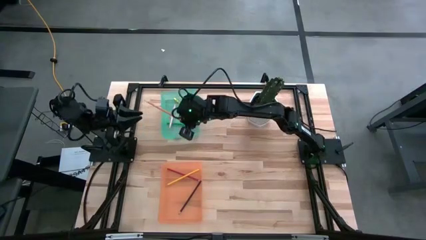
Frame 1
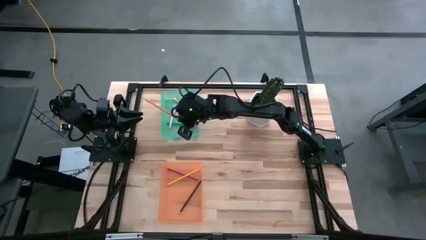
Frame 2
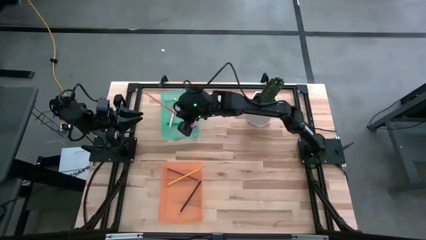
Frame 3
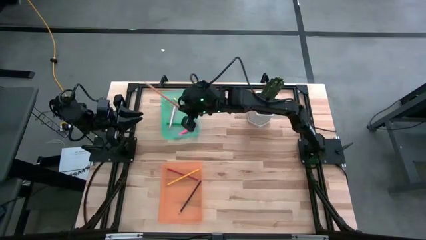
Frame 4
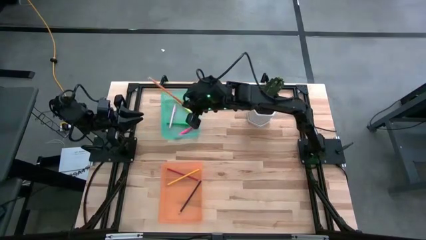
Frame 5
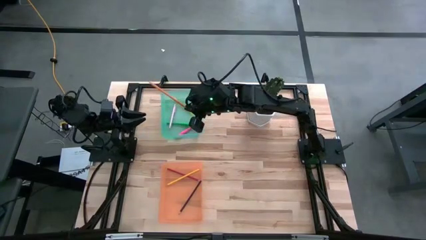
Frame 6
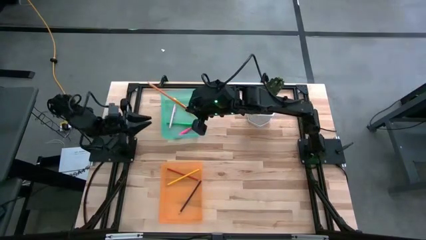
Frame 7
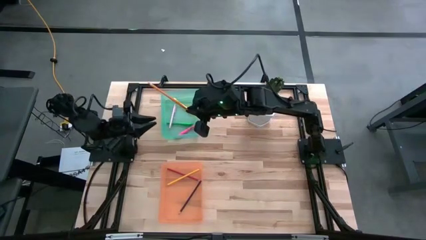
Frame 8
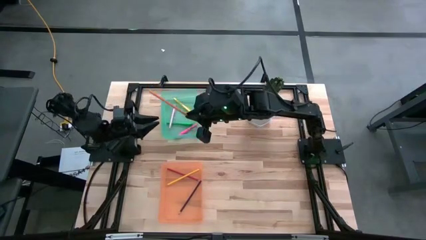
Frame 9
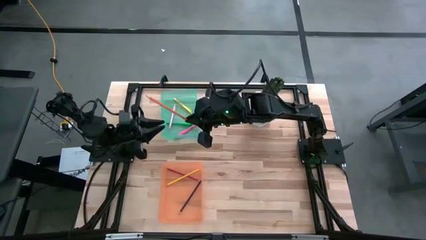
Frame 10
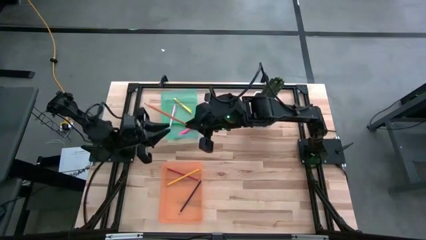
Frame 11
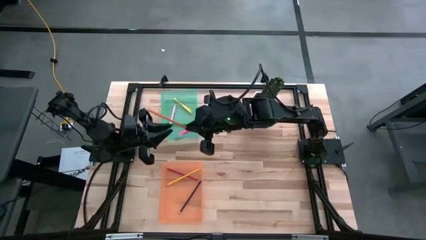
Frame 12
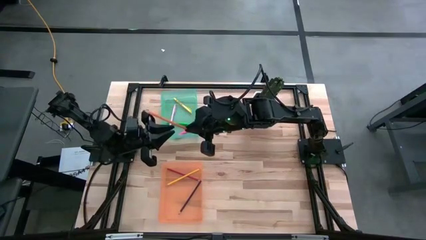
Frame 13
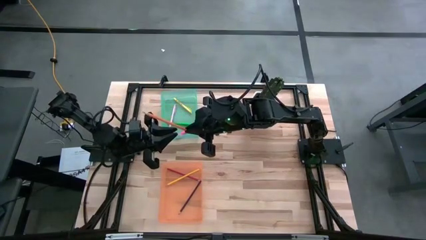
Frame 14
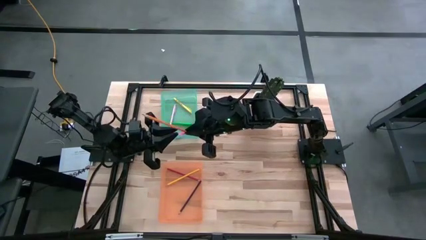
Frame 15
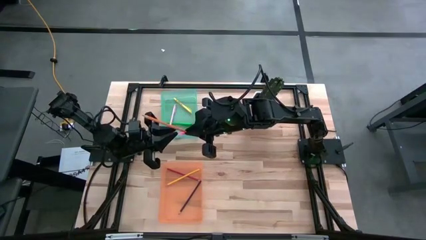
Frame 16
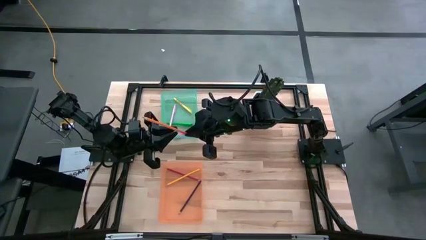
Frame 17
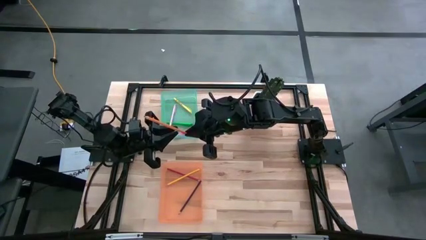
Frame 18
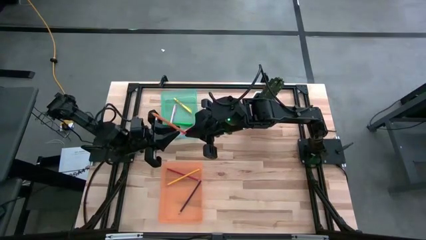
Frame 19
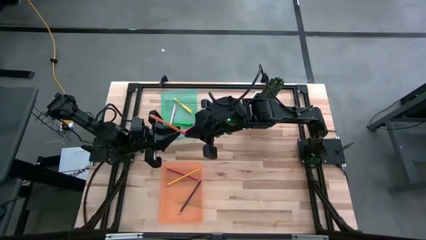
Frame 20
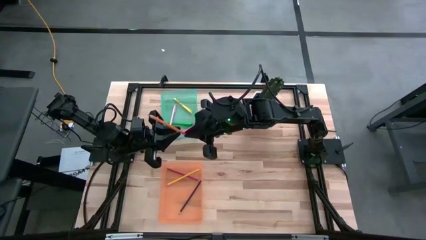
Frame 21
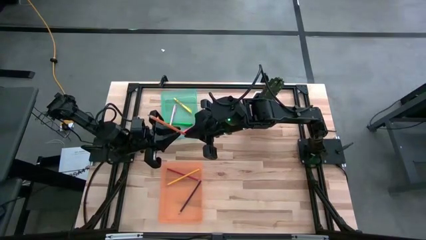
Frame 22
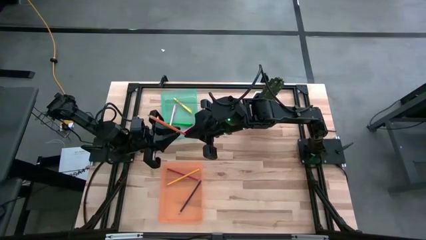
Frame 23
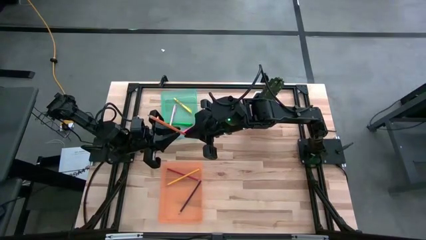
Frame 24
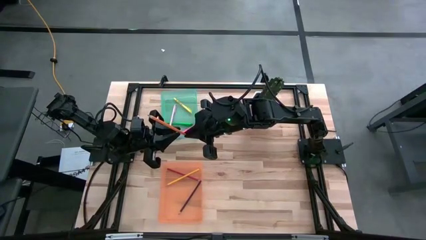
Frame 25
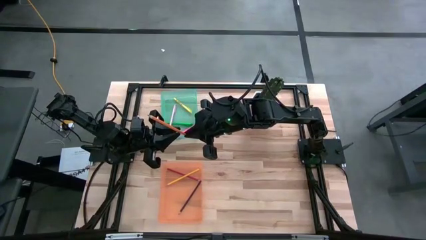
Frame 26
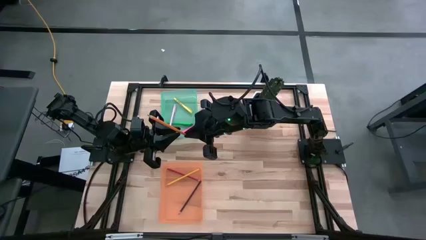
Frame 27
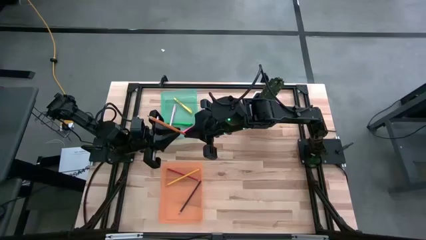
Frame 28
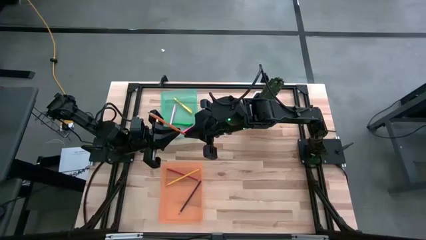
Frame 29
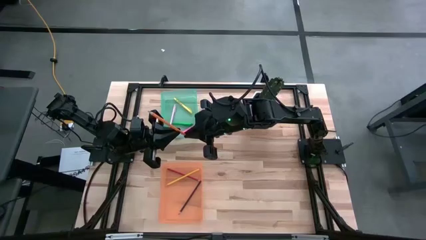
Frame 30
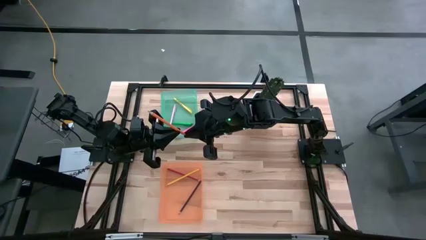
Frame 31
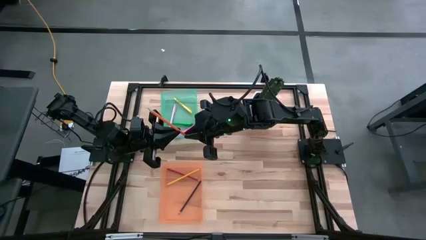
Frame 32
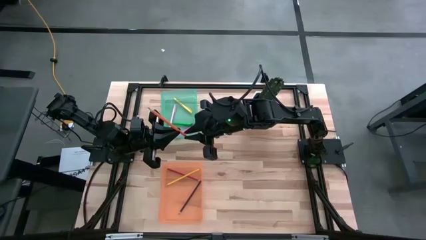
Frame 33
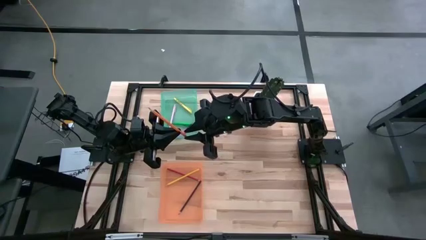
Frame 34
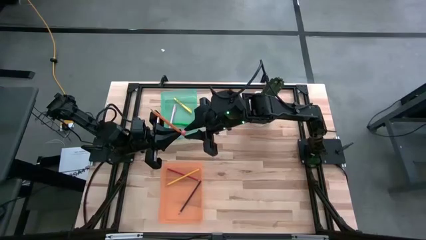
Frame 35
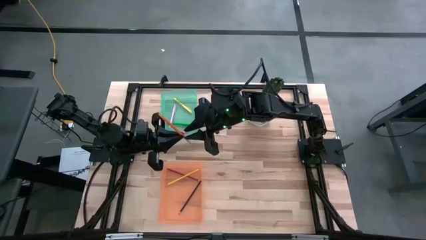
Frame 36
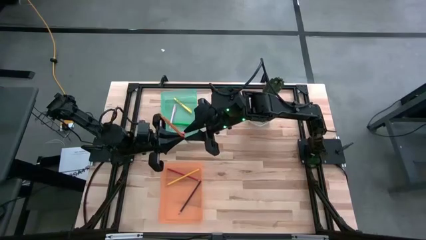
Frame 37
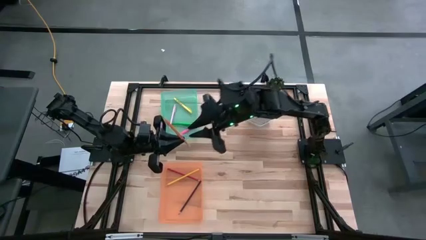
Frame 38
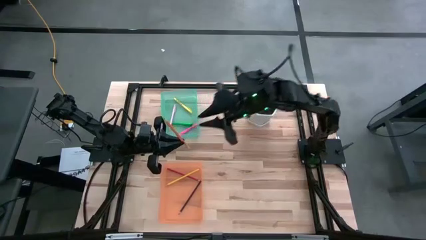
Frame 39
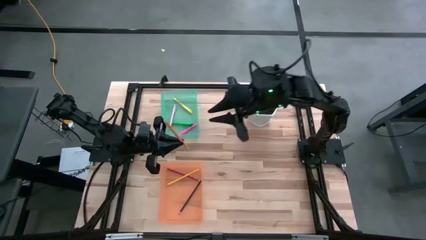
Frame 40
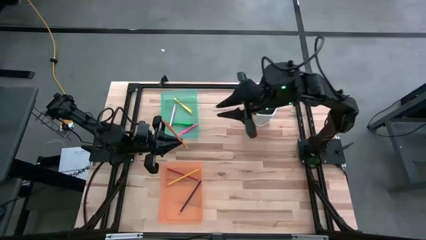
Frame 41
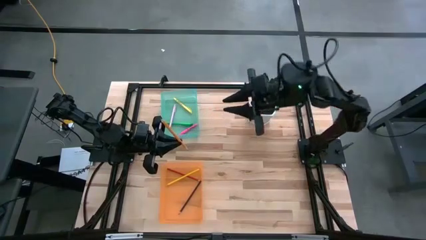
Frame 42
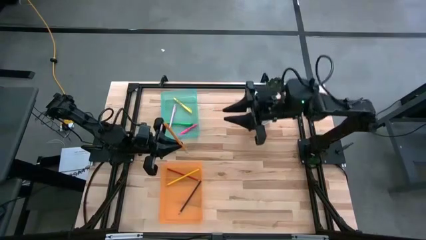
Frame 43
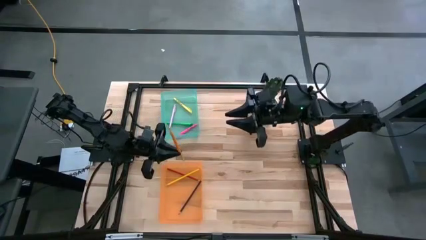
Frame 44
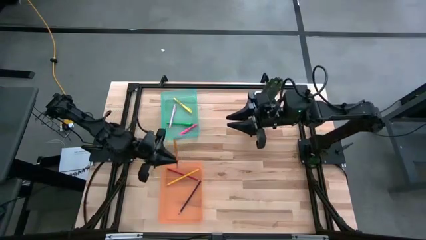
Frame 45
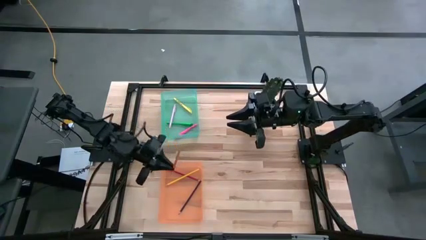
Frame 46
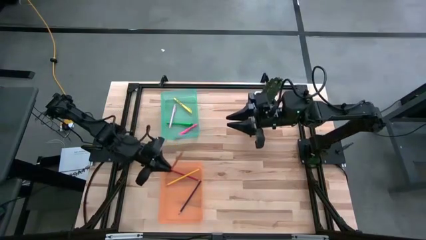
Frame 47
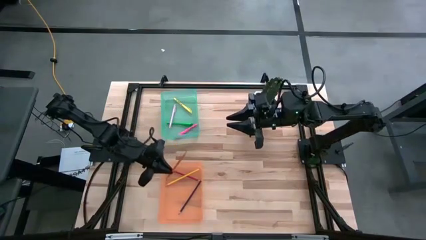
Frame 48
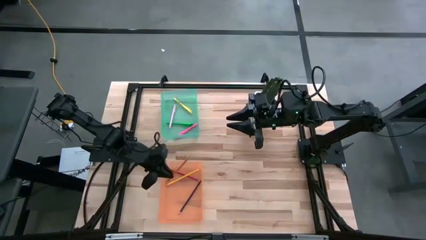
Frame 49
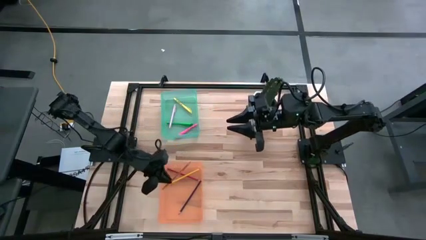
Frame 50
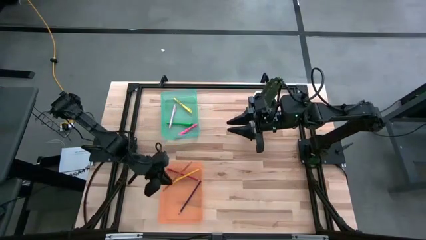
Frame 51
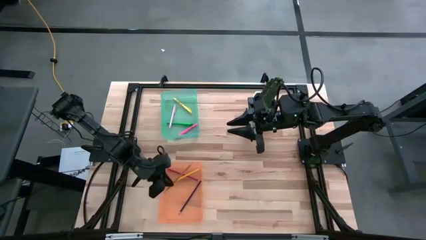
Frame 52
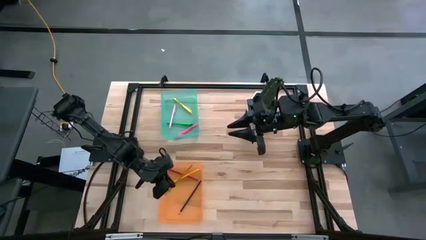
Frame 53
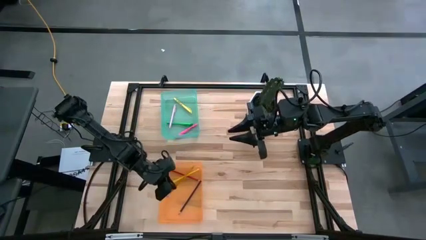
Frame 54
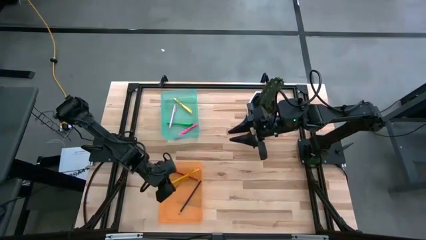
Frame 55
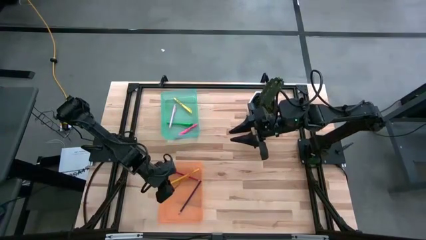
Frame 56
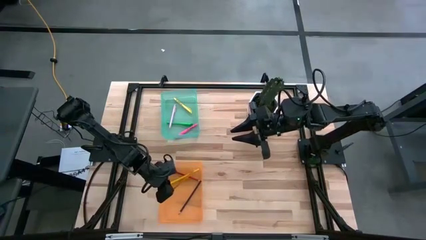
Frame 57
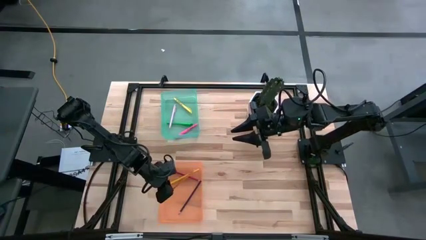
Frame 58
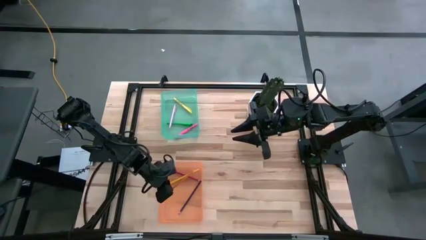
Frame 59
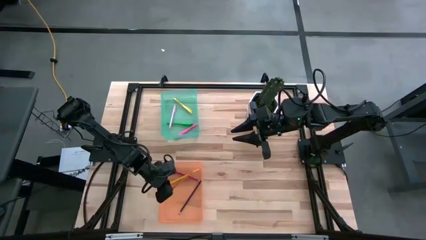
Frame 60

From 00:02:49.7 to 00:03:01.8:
Task: Sort pens & pencils
Put the orange pencil into the orange bin

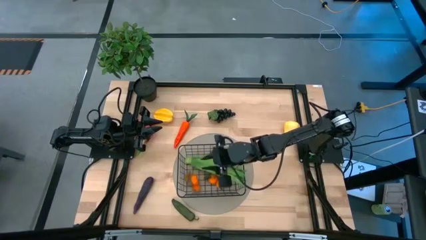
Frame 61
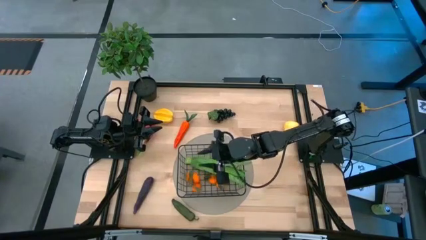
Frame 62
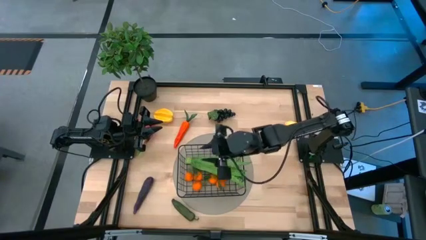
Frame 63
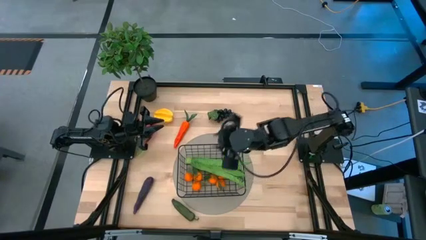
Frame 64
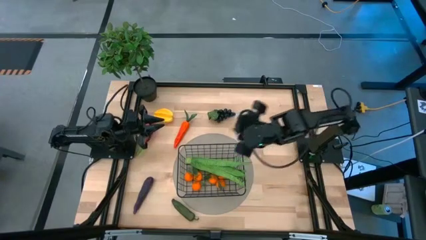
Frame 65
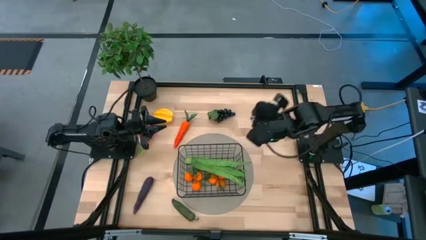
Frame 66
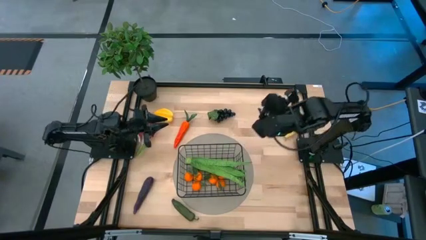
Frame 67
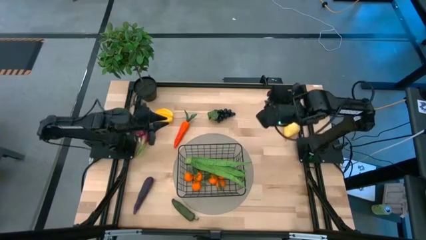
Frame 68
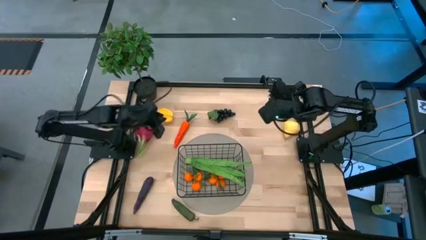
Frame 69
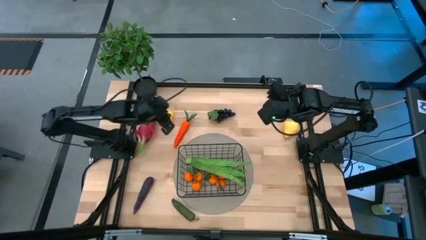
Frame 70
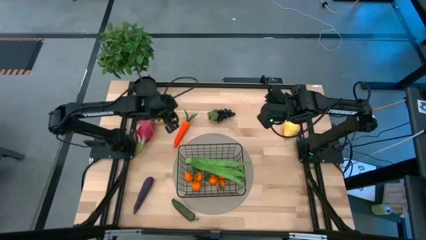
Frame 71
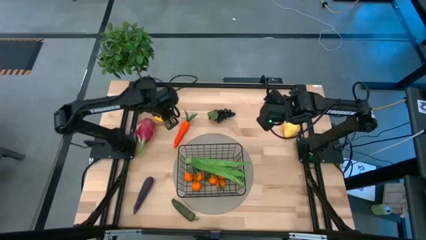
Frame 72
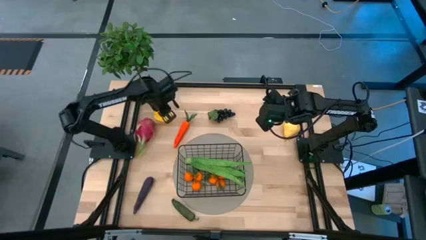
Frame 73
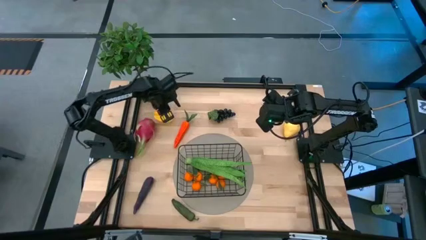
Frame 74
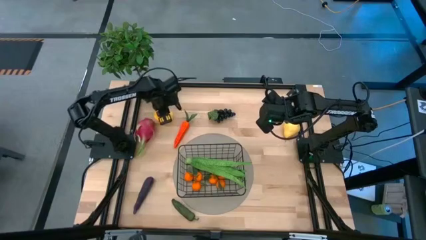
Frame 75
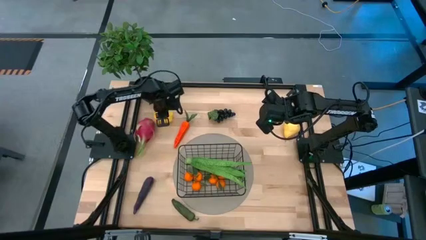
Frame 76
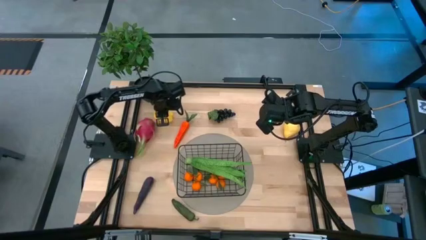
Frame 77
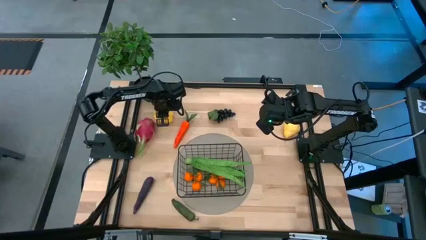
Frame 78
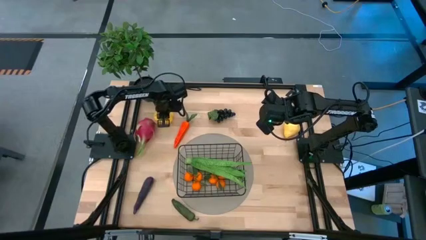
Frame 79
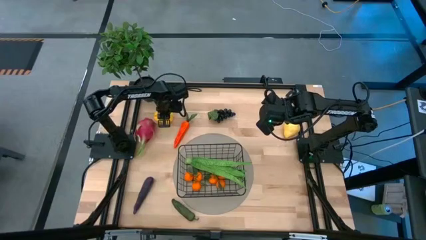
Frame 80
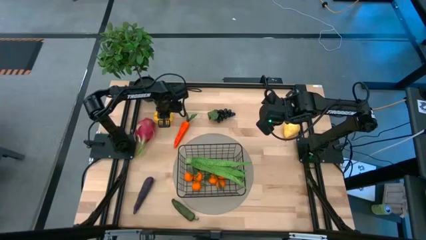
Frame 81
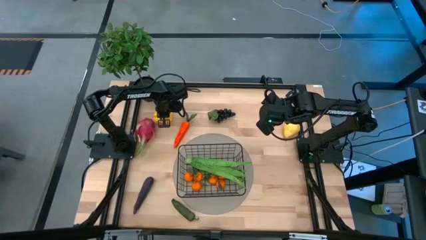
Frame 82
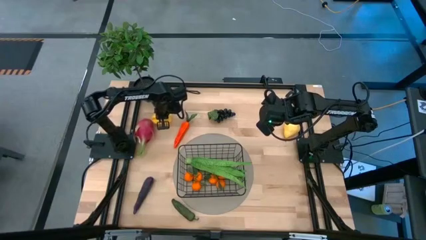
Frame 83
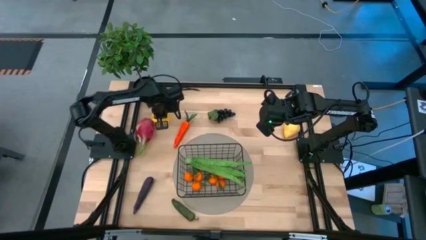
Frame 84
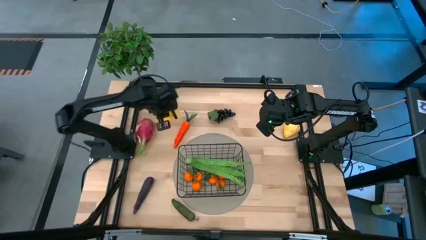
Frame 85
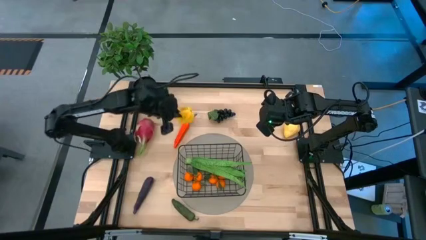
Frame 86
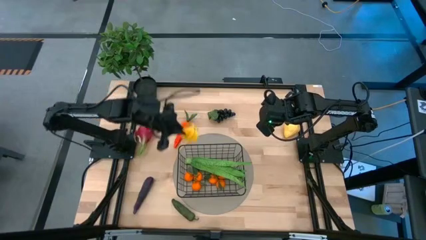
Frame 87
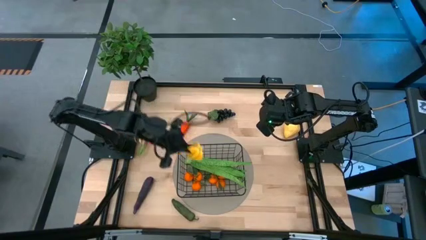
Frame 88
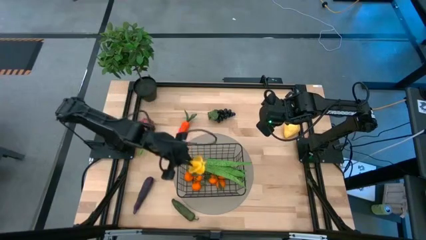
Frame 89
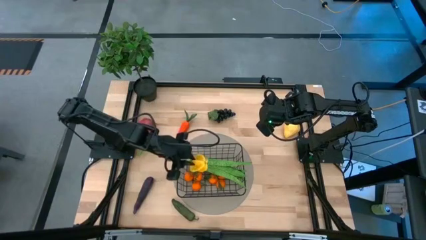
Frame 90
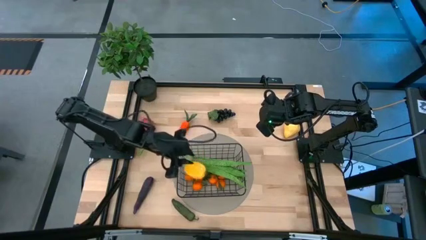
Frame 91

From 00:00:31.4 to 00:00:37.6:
Task: Build produce basket
Put the starfruit into the black basket
